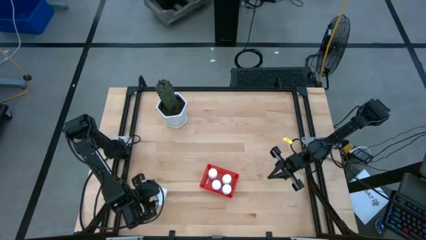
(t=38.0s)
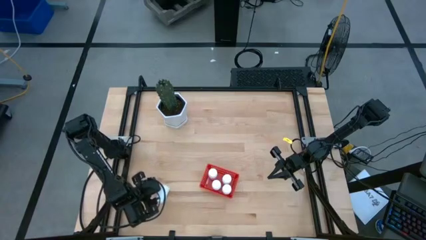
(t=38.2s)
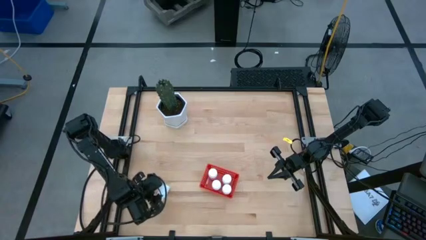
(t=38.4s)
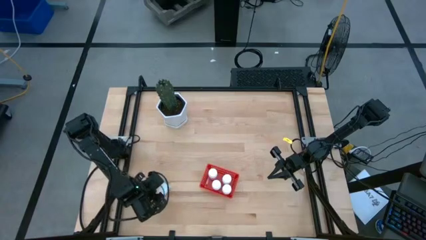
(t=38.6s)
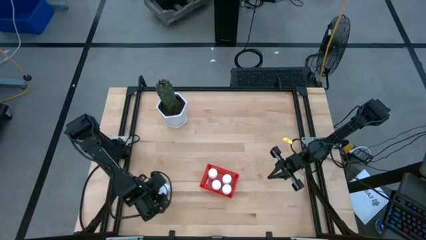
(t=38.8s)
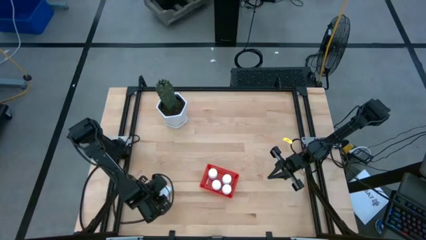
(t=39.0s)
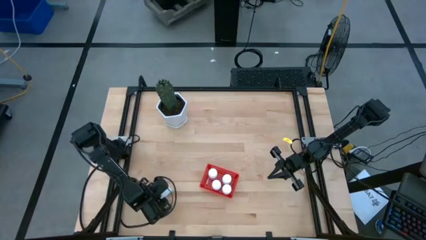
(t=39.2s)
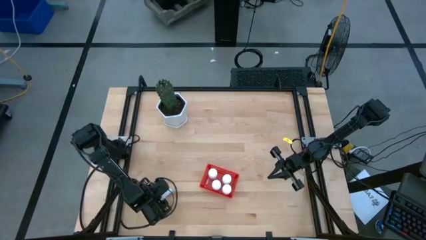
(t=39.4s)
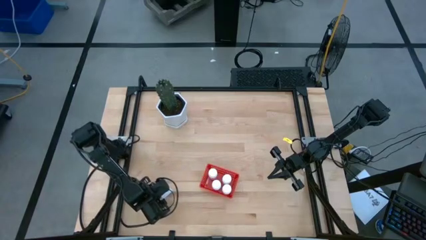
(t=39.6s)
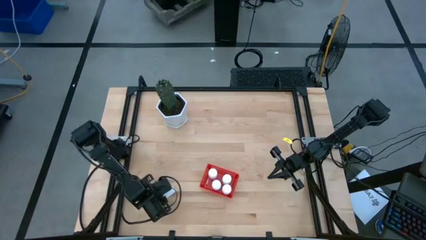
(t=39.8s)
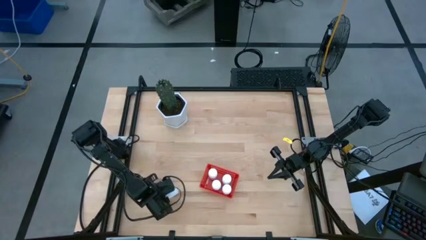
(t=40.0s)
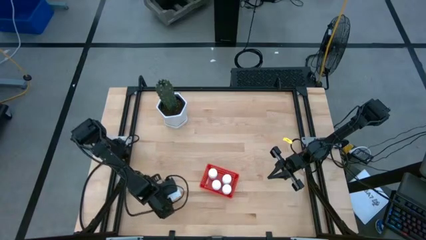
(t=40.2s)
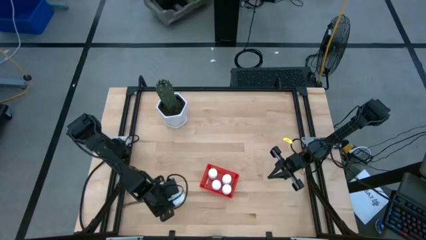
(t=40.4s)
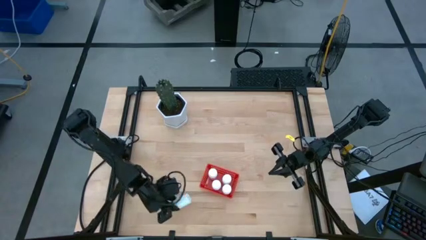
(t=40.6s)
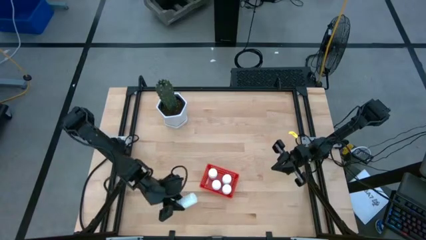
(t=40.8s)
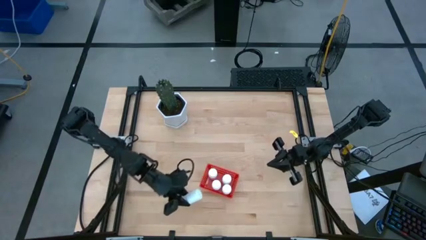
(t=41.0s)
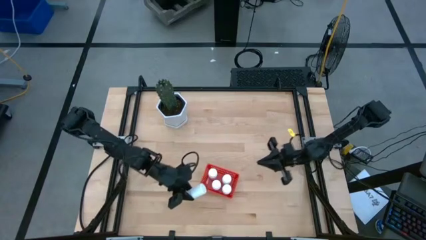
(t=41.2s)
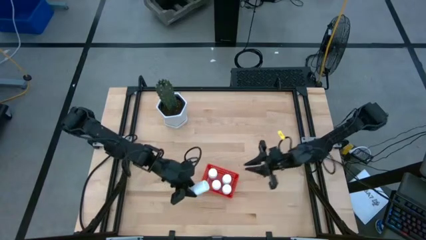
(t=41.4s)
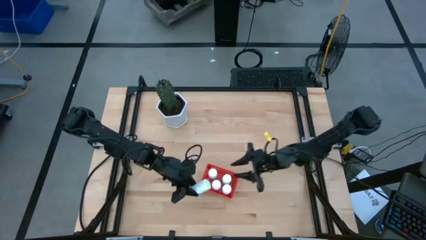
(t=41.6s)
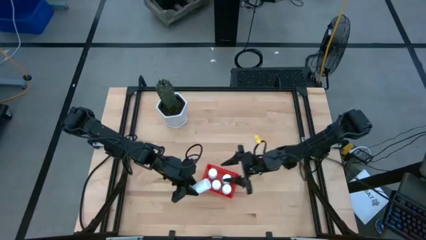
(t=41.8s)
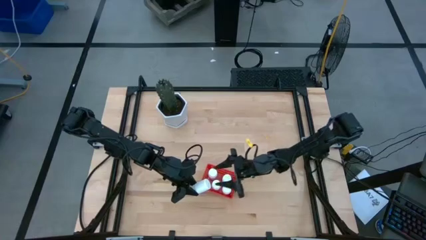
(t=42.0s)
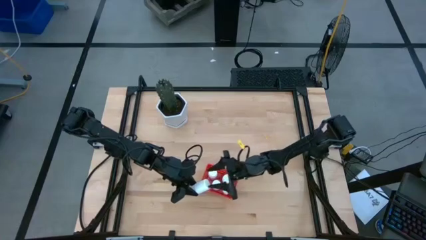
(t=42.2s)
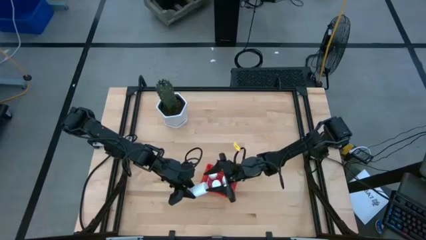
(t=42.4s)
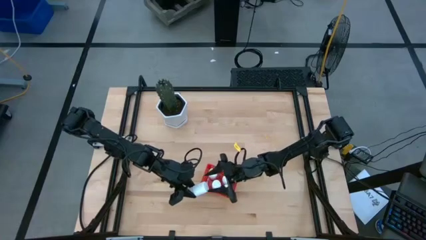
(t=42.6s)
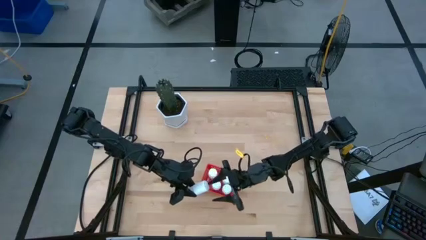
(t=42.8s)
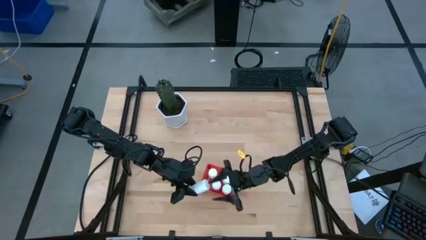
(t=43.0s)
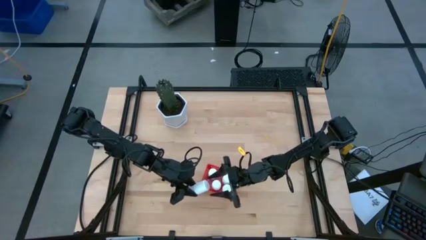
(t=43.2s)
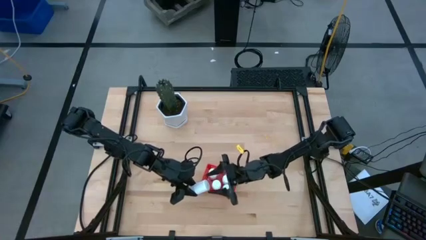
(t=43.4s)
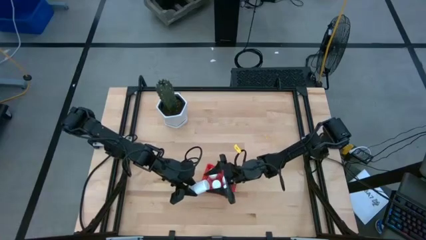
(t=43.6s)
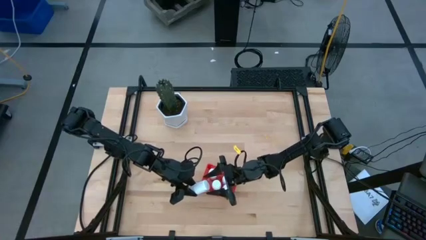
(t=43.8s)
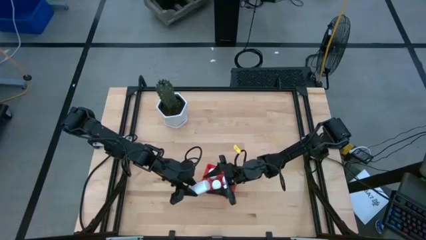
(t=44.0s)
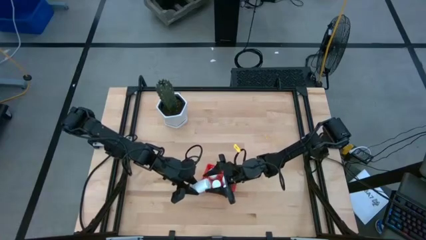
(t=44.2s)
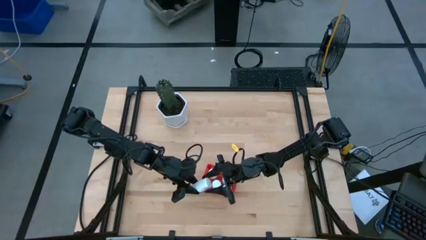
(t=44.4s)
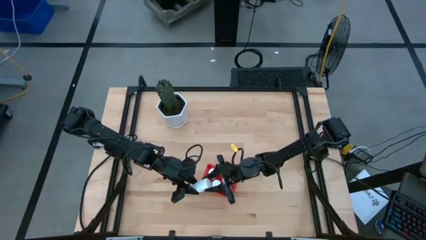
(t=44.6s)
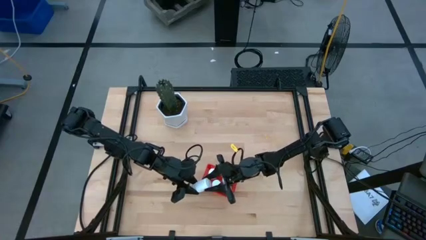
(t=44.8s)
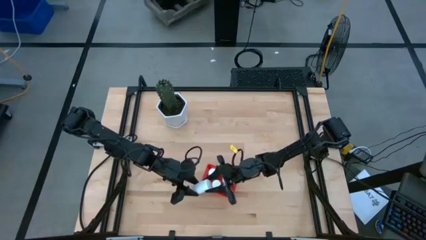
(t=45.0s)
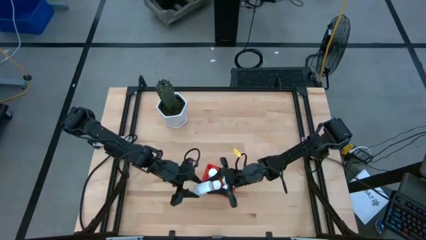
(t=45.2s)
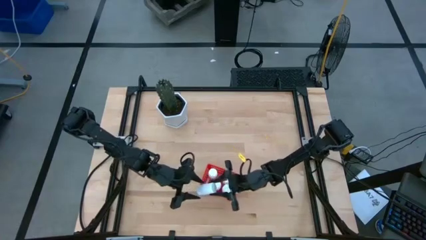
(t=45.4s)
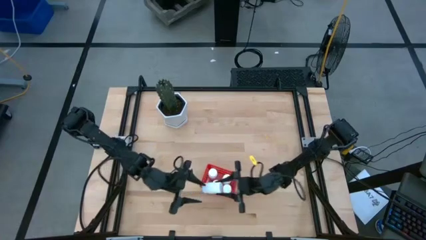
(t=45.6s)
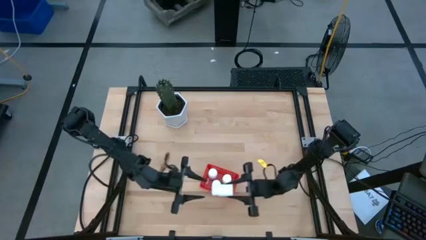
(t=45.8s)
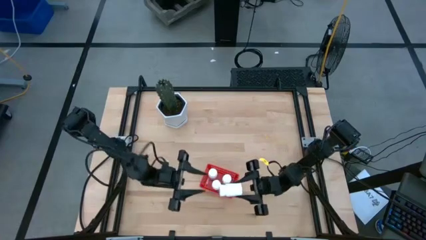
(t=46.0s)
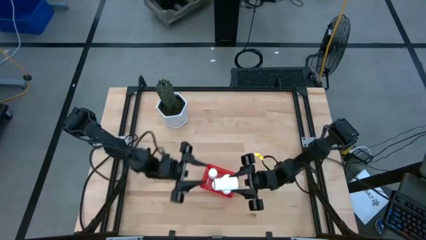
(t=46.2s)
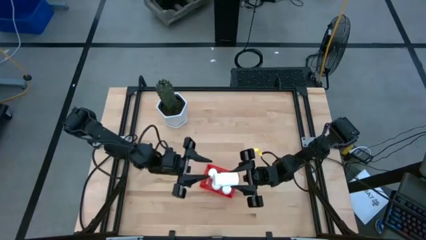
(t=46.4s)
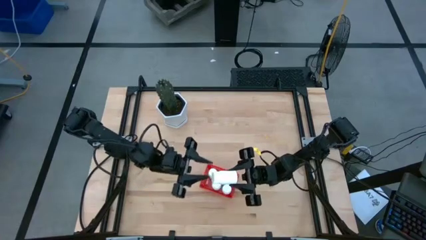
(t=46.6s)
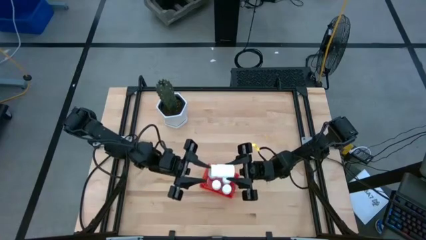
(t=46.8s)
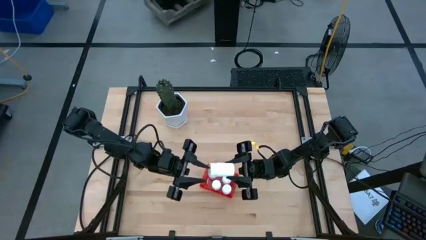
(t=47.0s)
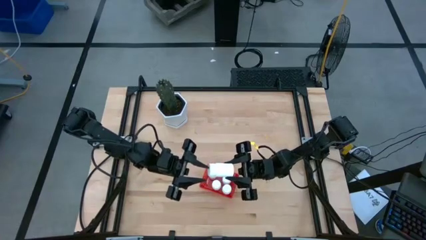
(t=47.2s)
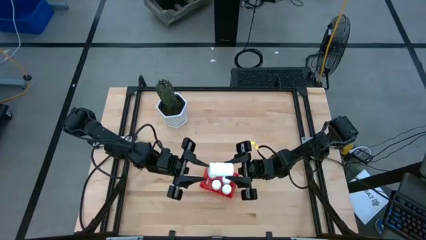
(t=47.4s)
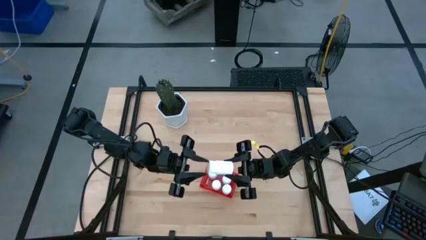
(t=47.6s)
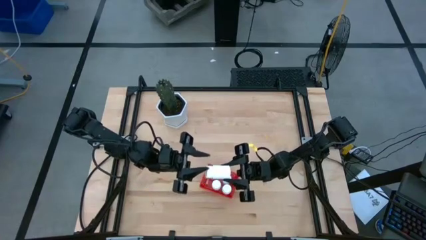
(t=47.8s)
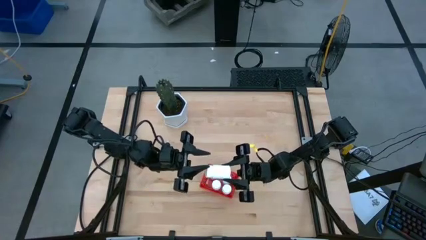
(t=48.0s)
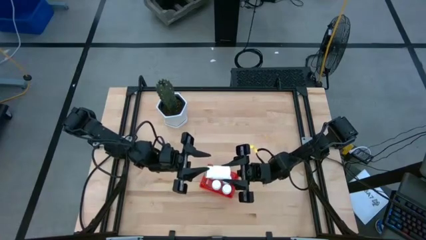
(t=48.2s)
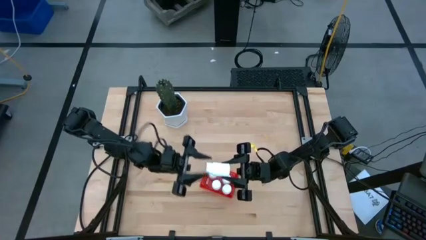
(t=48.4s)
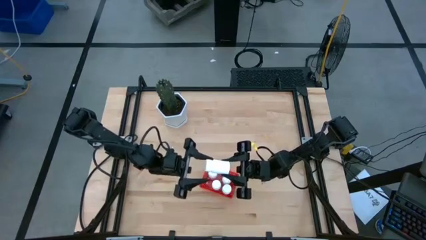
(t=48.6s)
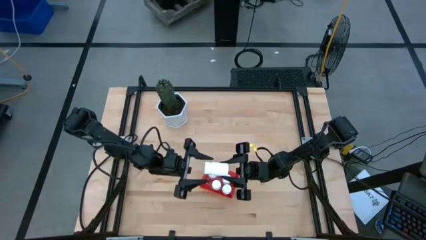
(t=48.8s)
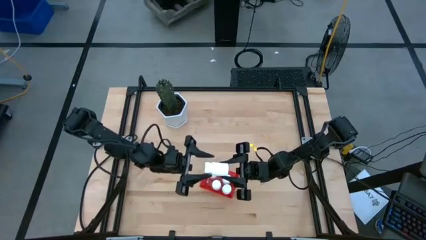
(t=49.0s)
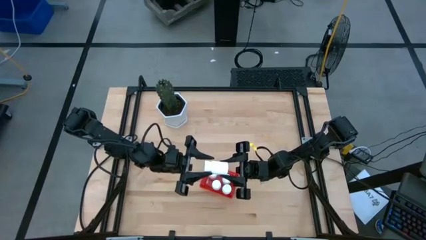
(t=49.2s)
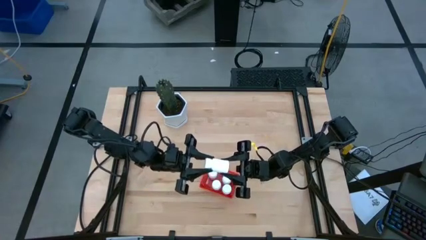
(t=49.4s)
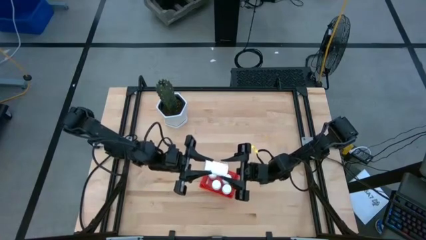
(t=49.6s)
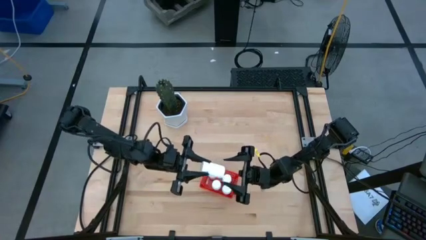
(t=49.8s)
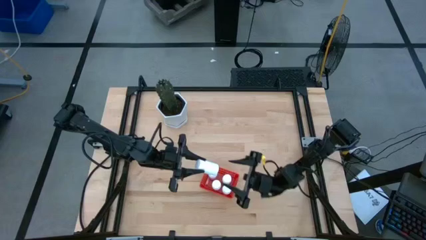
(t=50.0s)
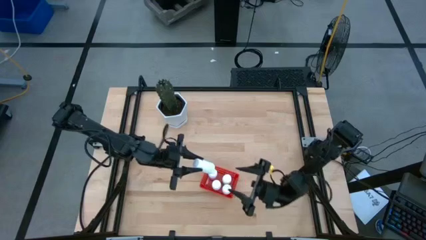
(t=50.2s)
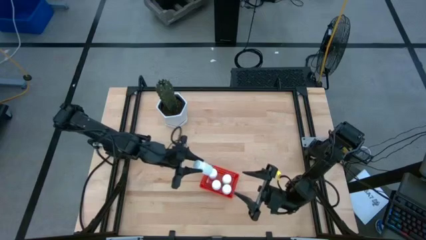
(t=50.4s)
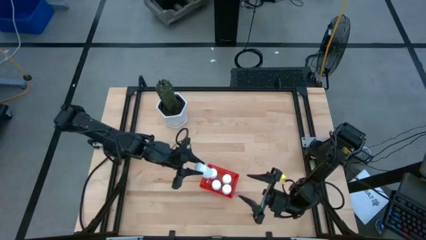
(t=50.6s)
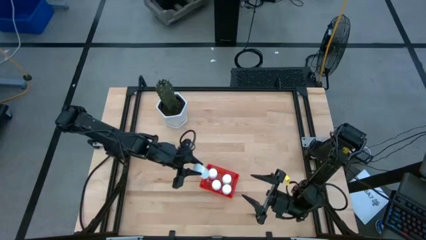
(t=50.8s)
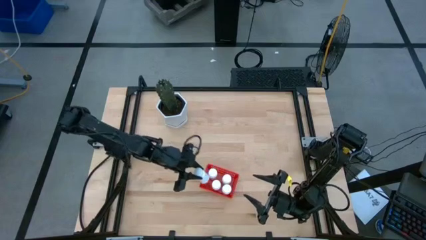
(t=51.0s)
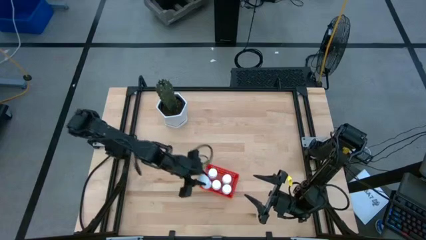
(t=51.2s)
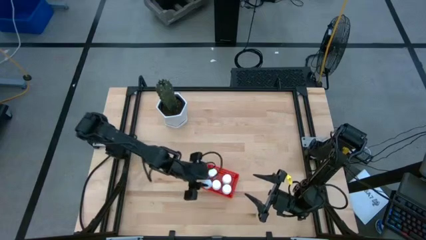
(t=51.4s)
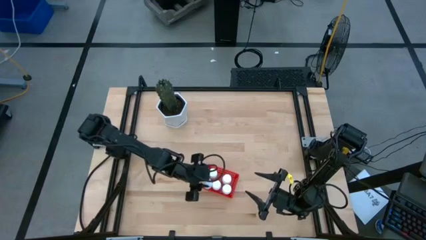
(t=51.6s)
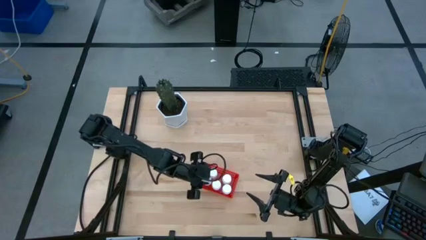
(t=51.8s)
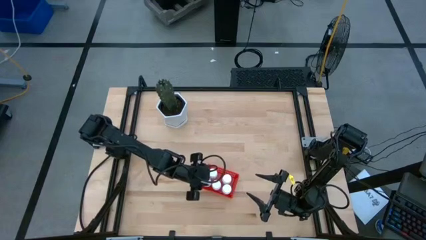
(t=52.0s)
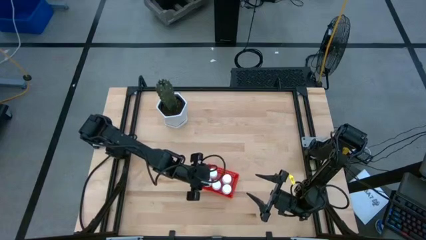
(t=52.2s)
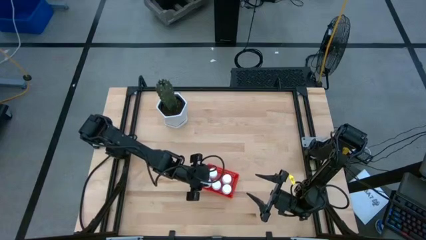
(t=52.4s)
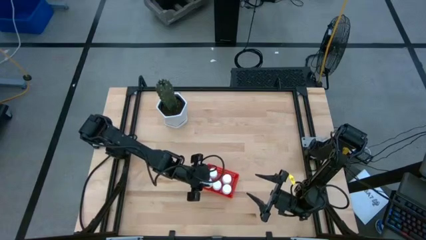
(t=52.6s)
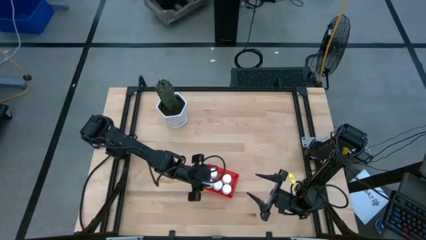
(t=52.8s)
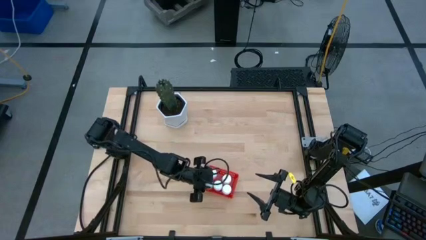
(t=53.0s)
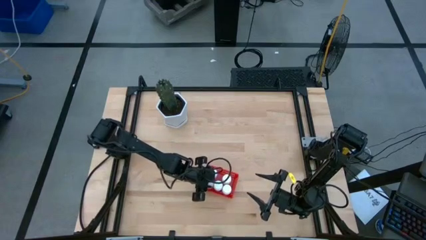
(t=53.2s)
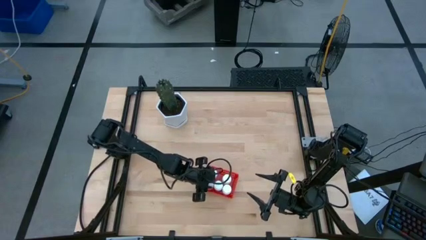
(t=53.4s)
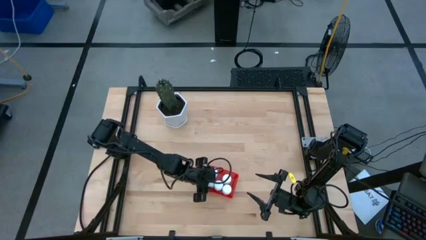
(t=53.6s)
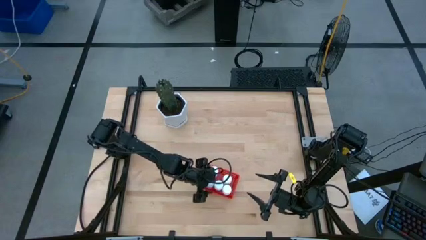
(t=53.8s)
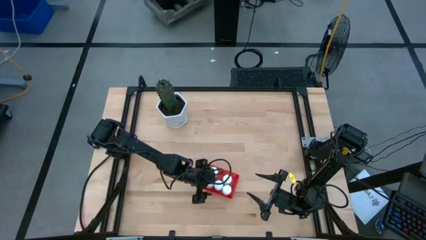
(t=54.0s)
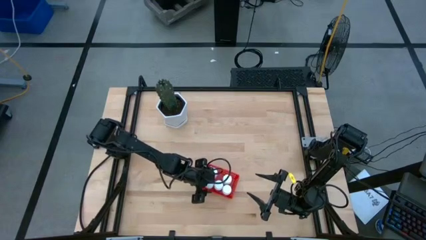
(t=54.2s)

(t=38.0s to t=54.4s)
Task: Pick and place pill bottles into a basket
Put the white pill bottle into the red bin
